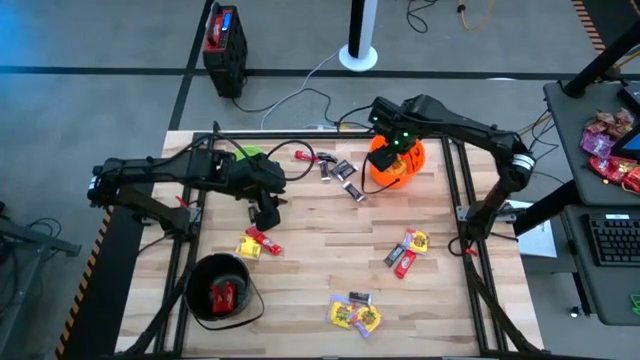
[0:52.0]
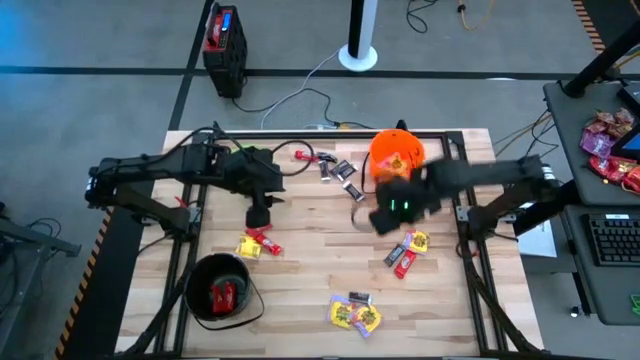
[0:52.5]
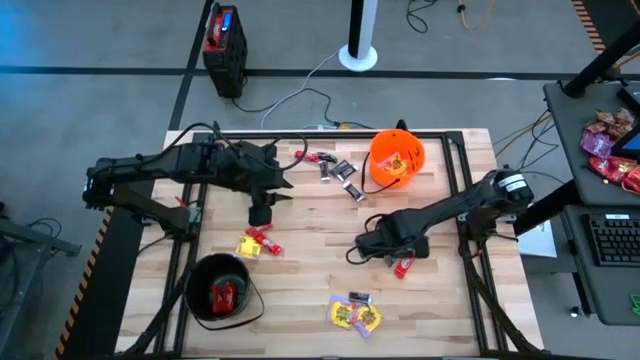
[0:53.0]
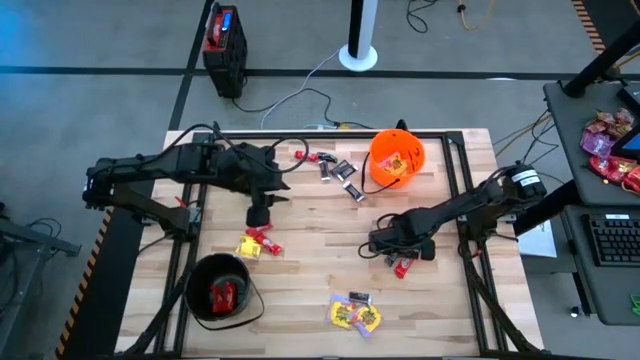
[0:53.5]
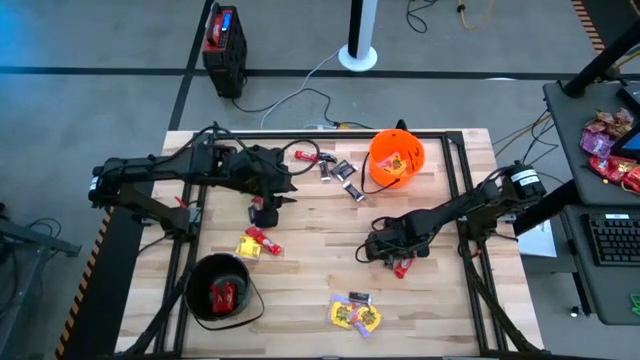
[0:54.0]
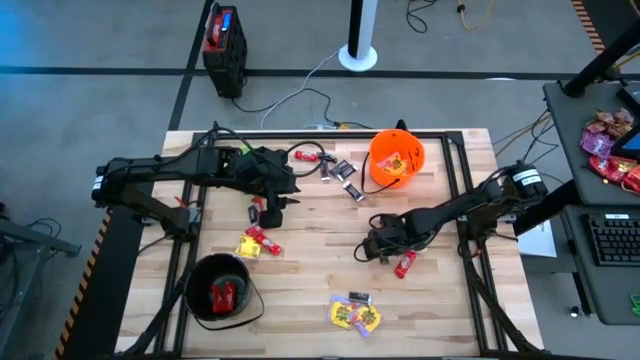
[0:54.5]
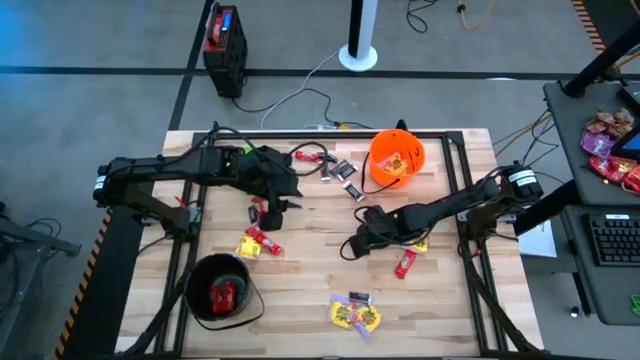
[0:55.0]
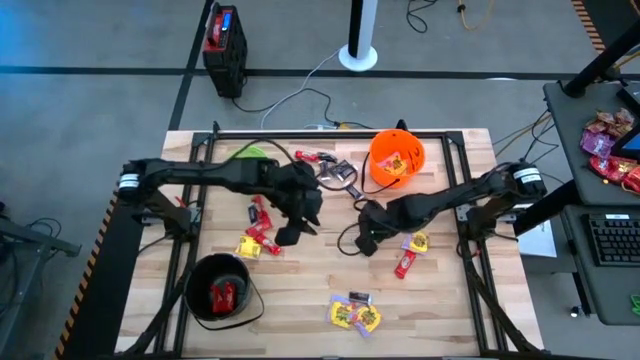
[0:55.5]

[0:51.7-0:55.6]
Task: Sort candy by brand, put in halloween buckets
Put the brown candy into the green bucket

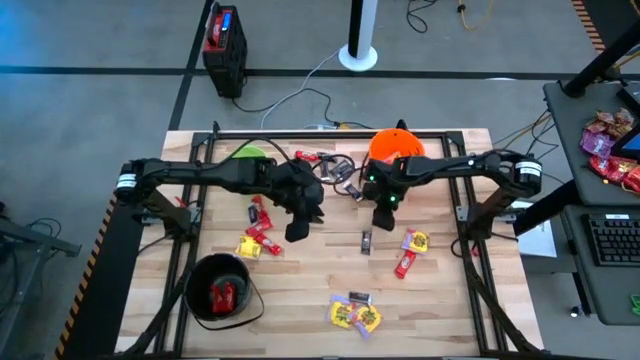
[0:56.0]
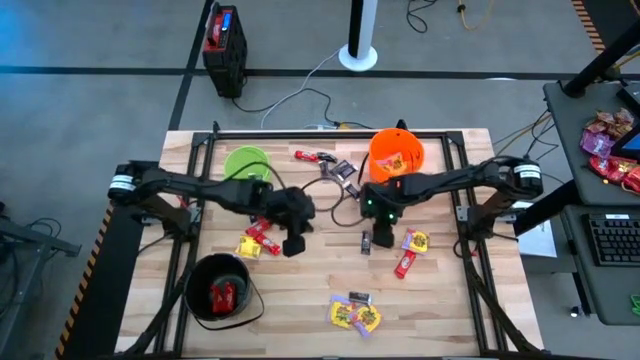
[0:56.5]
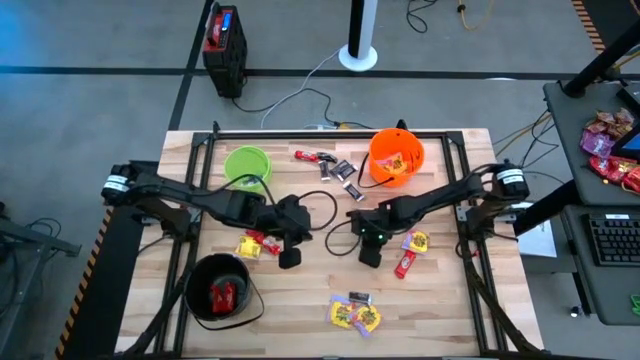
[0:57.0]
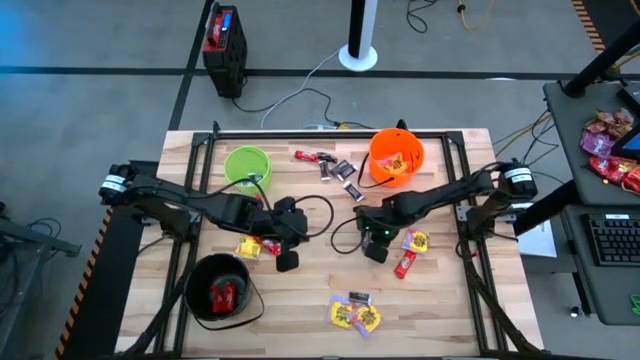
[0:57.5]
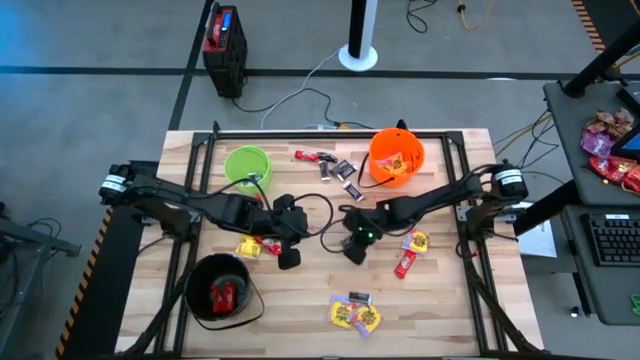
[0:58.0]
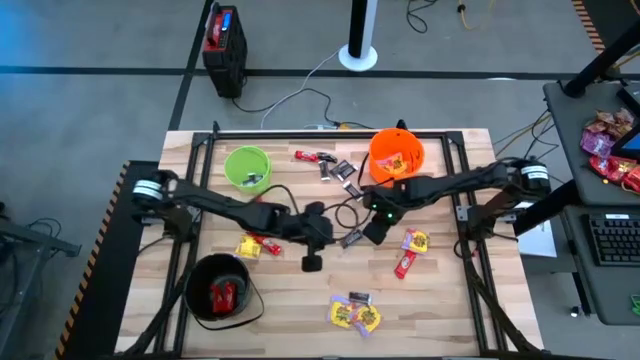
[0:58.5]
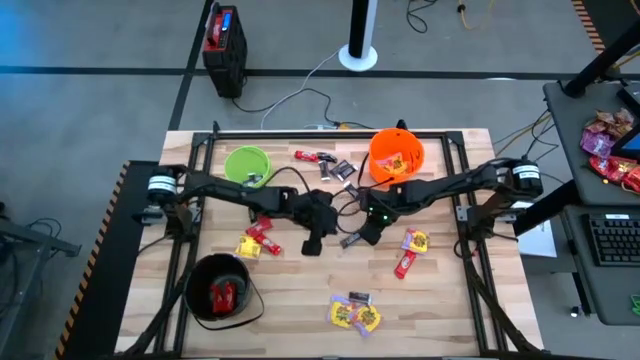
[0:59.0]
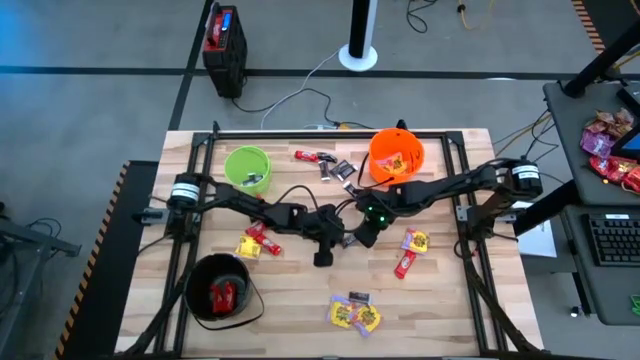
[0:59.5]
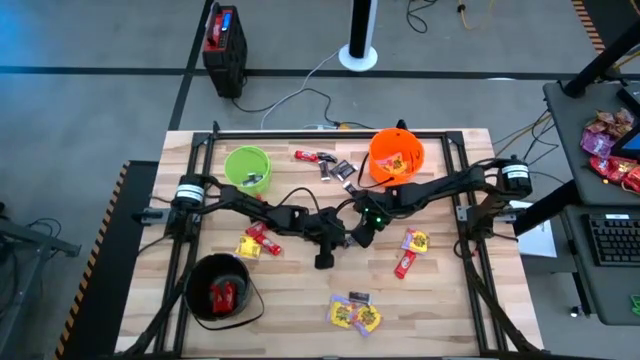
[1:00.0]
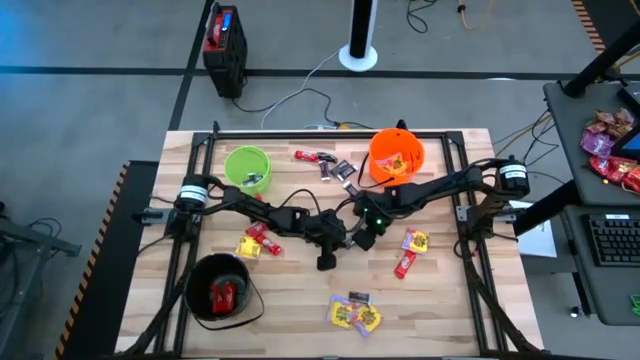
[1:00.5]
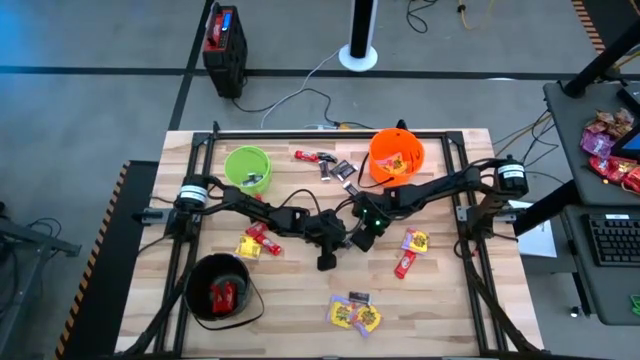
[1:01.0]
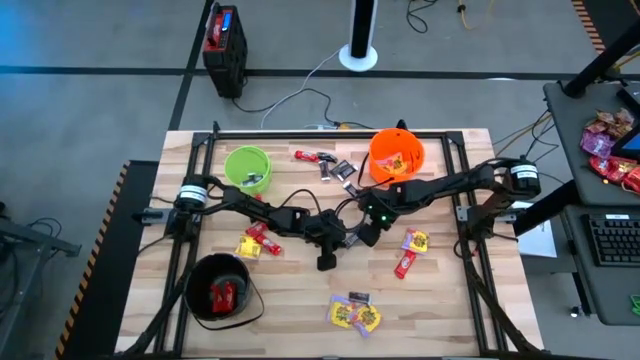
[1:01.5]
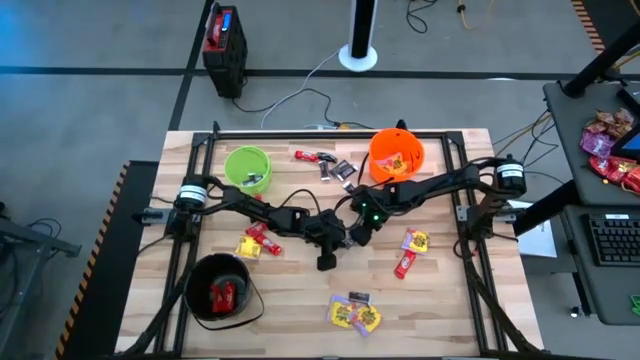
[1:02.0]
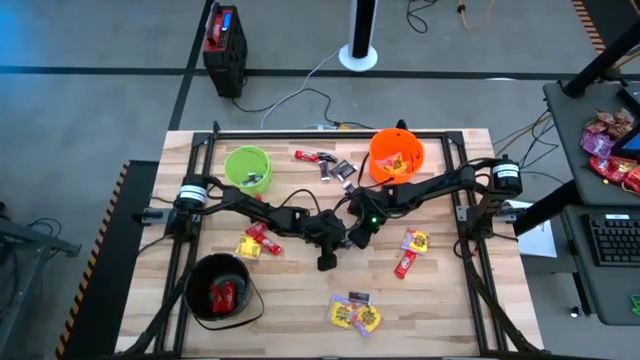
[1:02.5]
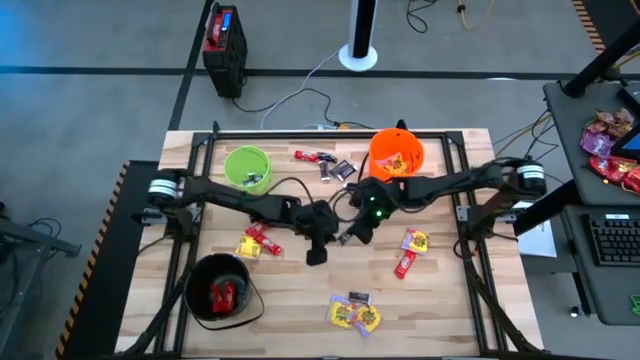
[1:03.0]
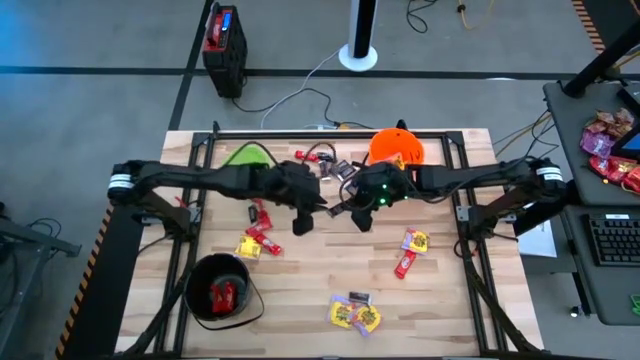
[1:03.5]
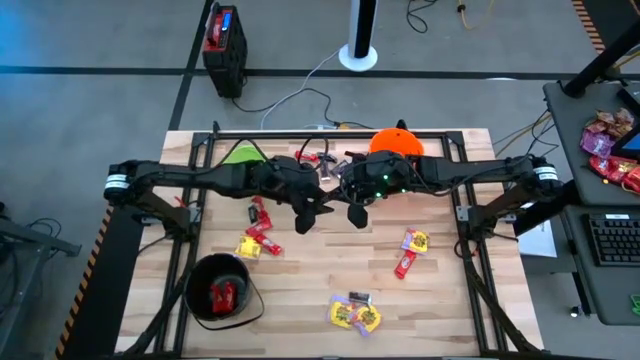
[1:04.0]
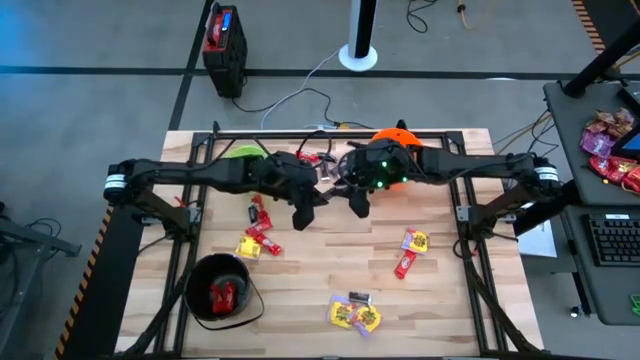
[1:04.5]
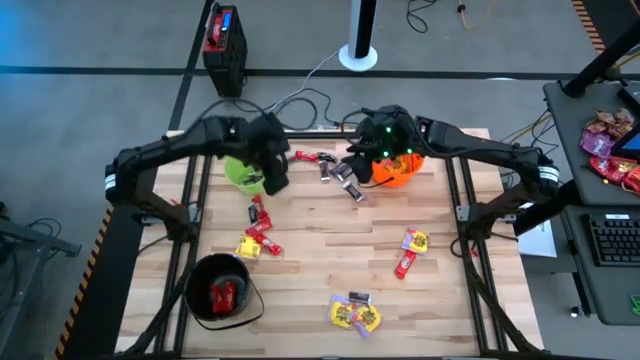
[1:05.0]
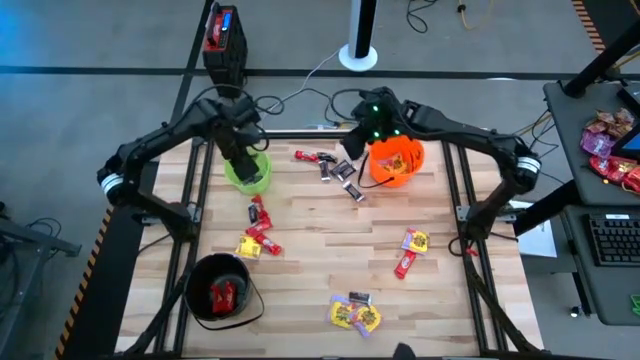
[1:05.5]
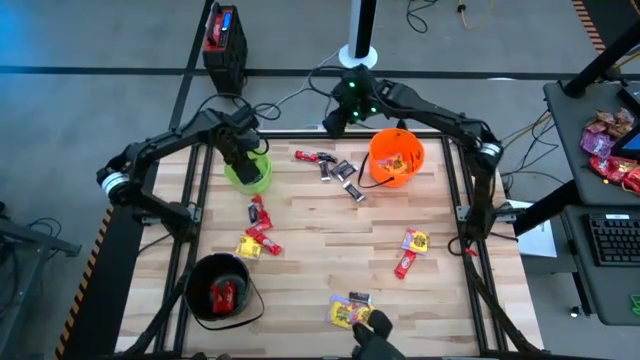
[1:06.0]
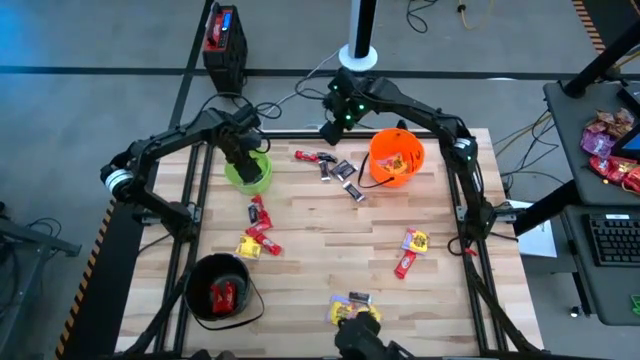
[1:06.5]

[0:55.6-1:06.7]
Put the brown candy into the green bucket

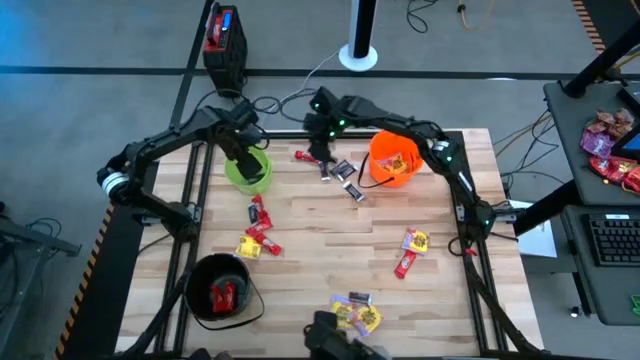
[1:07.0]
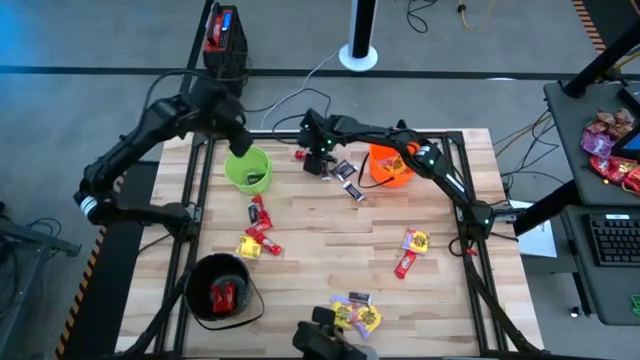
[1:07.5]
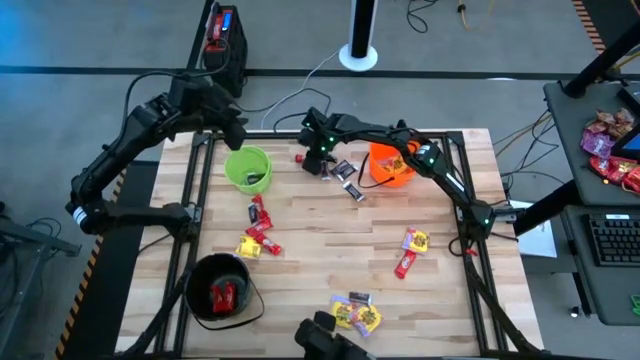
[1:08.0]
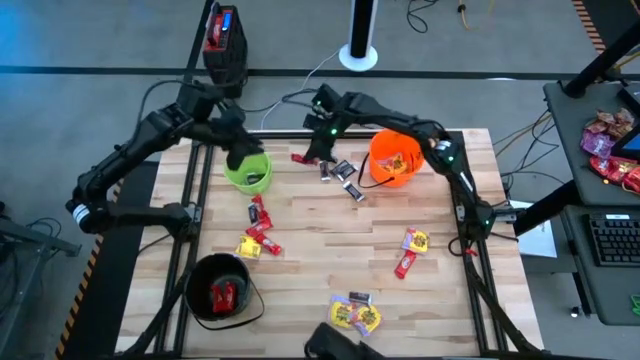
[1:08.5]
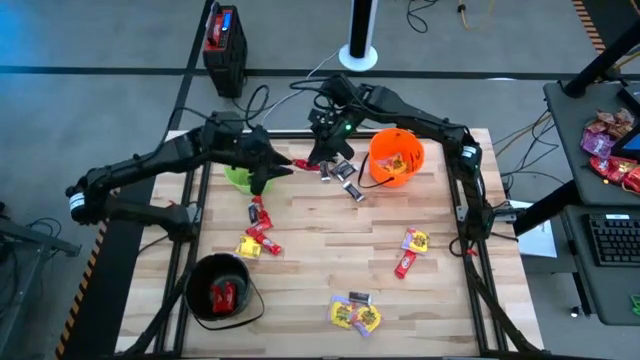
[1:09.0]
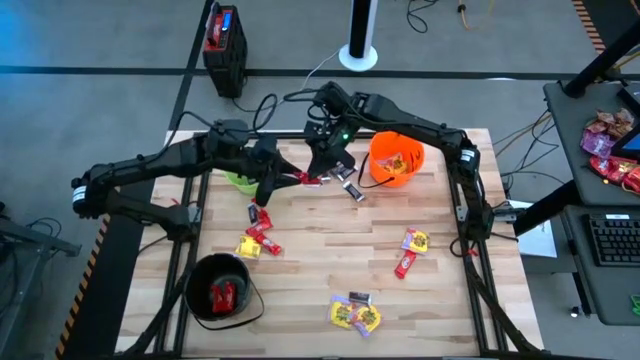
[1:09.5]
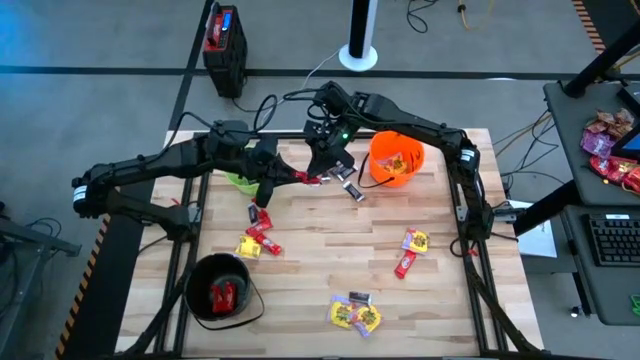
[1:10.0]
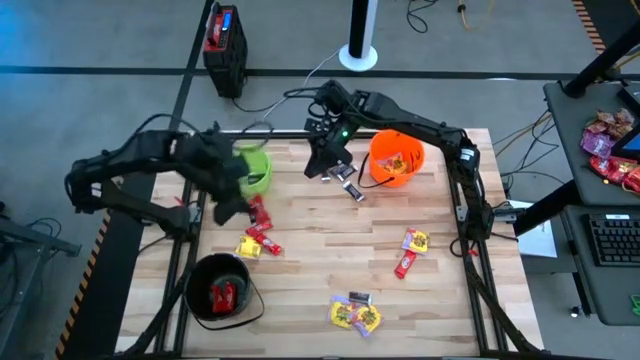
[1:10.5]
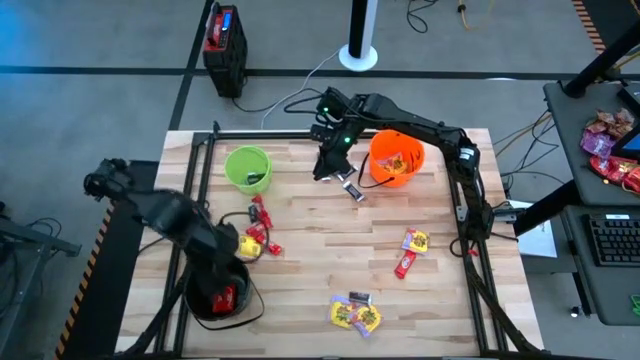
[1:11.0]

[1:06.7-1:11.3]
Put the red candy into the black bucket

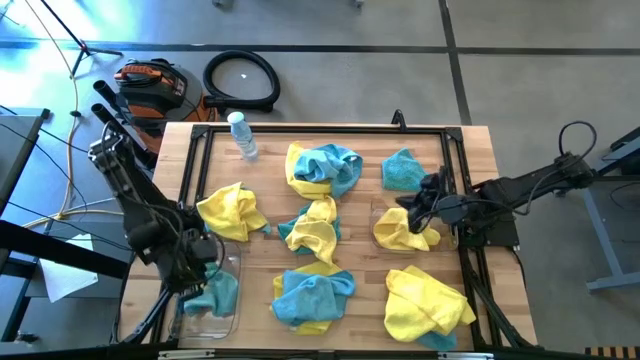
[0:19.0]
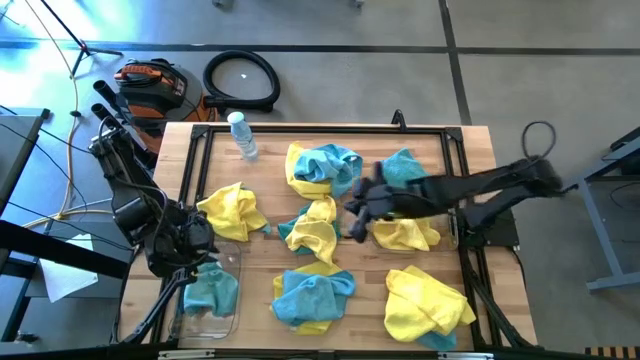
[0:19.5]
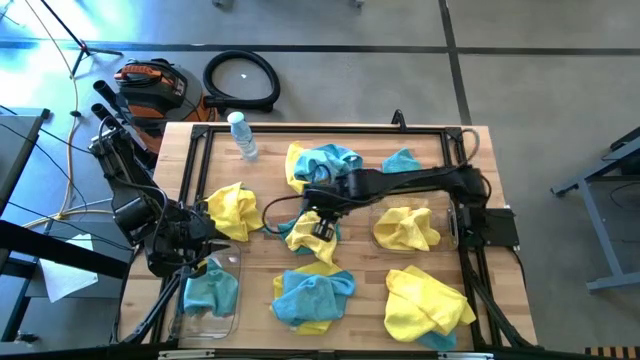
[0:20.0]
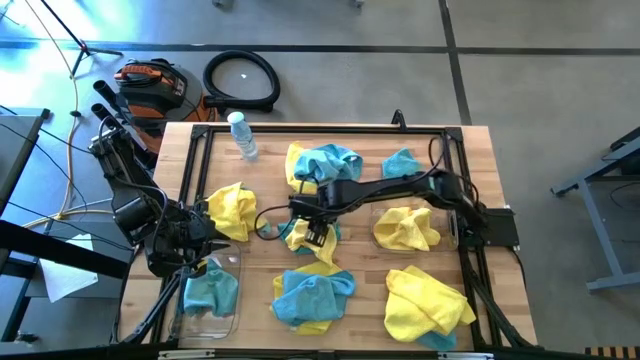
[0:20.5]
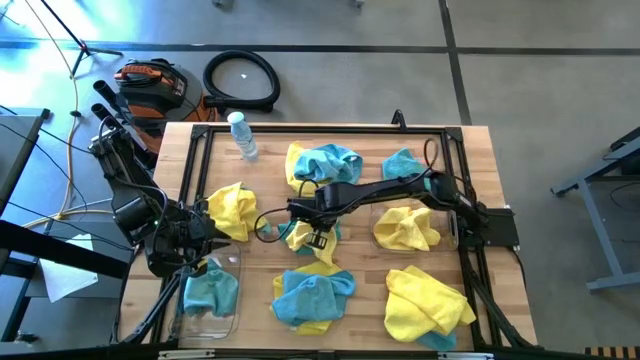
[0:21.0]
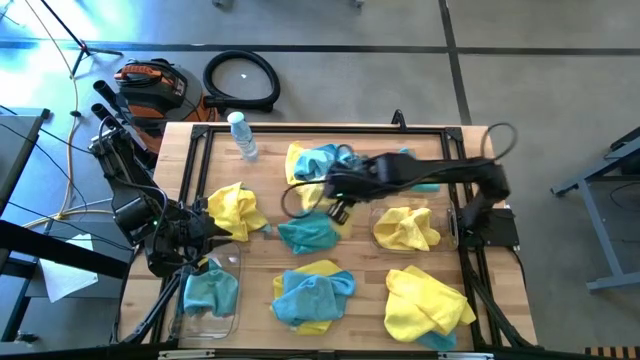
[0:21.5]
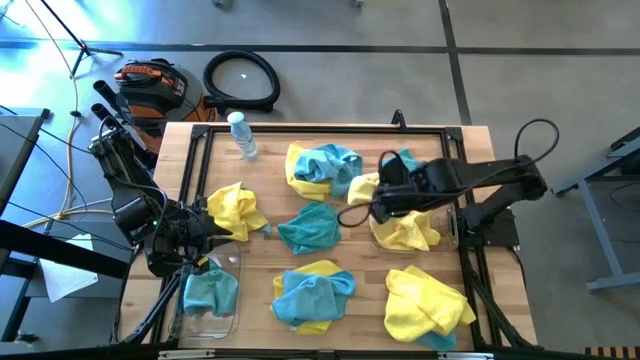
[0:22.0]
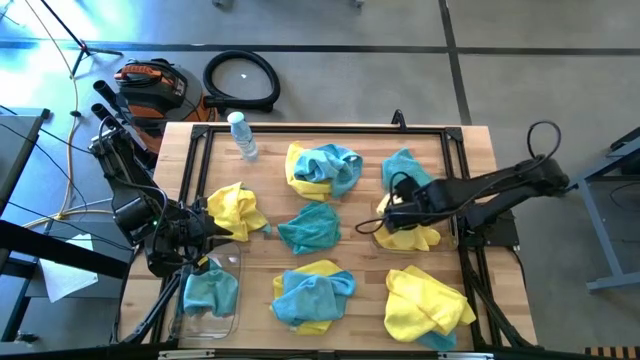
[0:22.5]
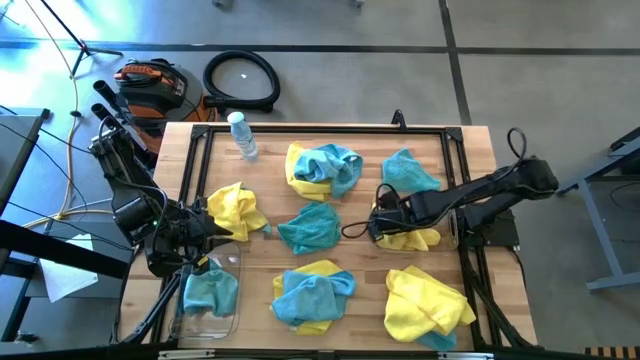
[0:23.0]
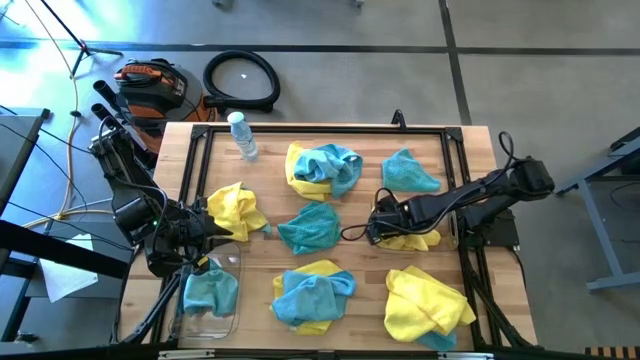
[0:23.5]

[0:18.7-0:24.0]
Task: Sort microfiber towel by color & place in baskets
Put the yellow microfiber towel into the right transparent bin
